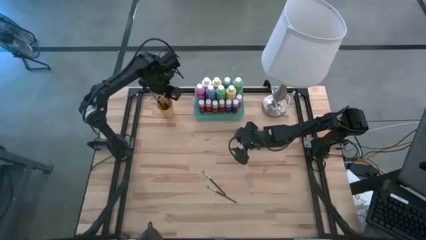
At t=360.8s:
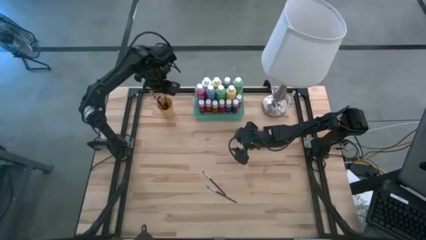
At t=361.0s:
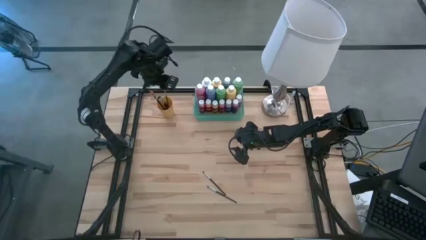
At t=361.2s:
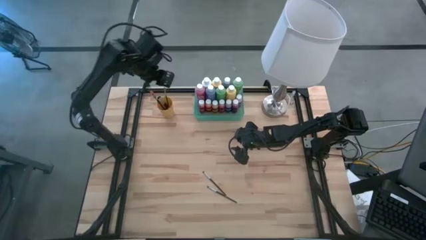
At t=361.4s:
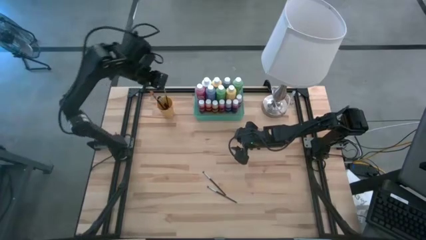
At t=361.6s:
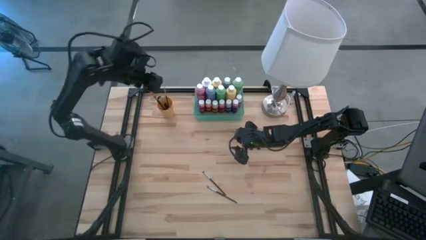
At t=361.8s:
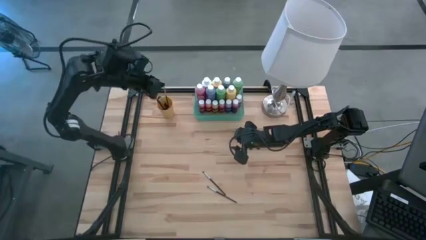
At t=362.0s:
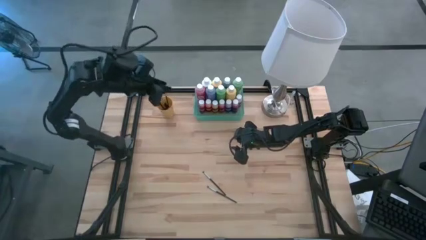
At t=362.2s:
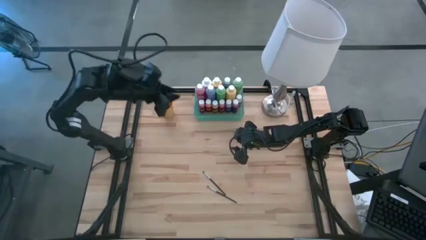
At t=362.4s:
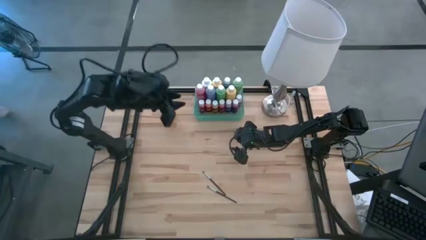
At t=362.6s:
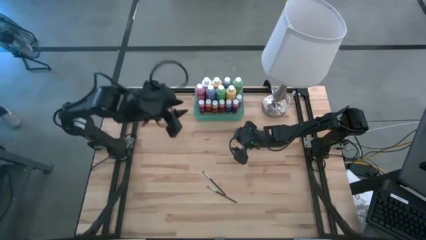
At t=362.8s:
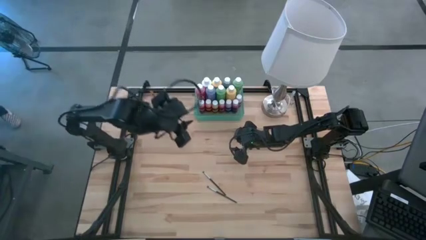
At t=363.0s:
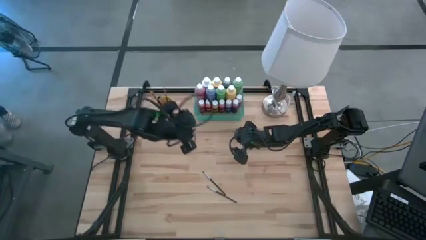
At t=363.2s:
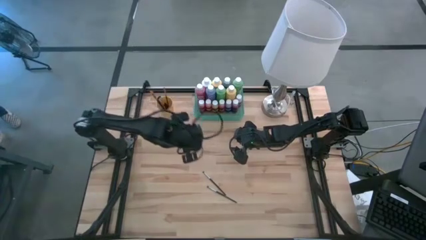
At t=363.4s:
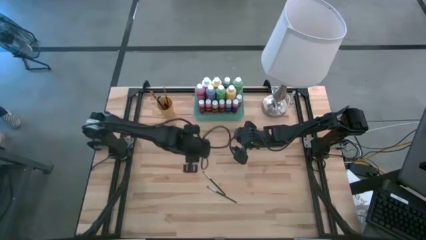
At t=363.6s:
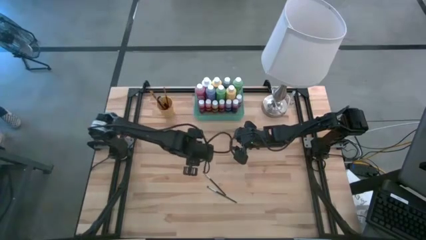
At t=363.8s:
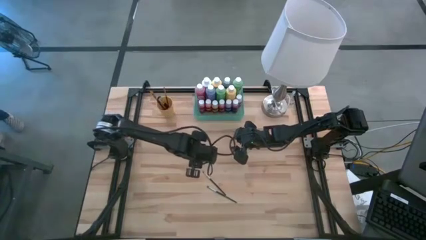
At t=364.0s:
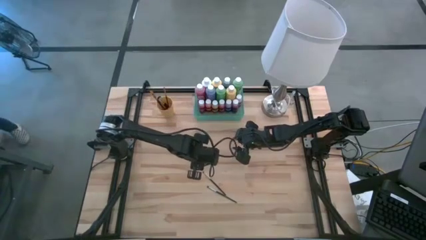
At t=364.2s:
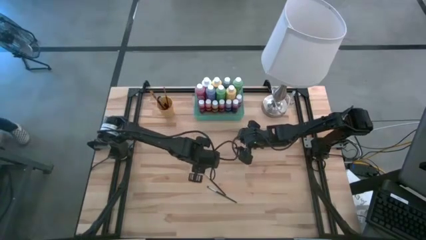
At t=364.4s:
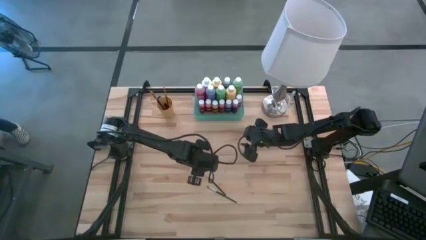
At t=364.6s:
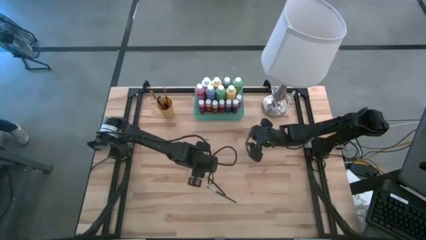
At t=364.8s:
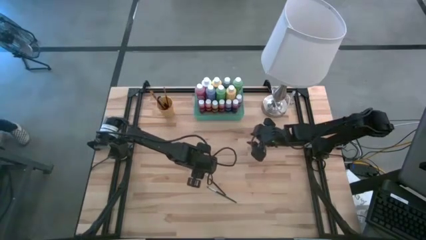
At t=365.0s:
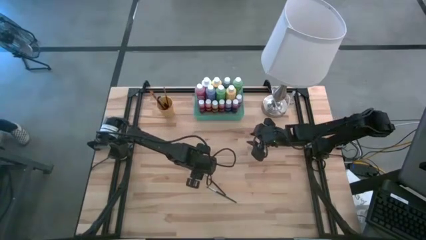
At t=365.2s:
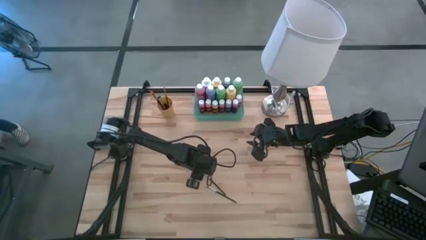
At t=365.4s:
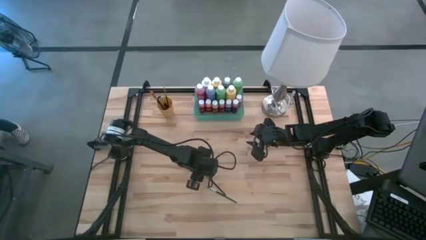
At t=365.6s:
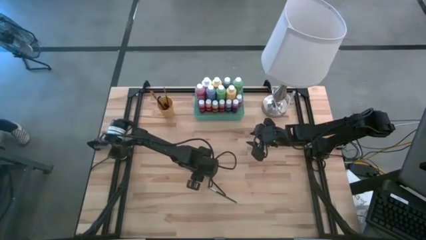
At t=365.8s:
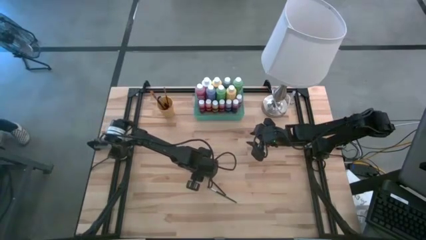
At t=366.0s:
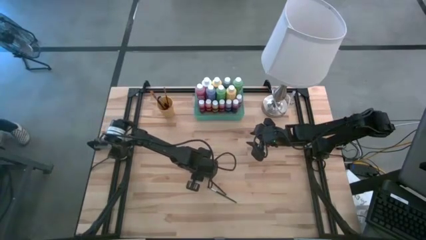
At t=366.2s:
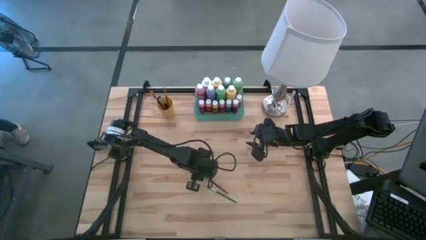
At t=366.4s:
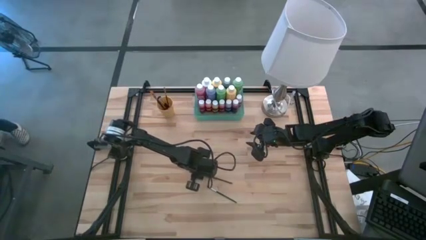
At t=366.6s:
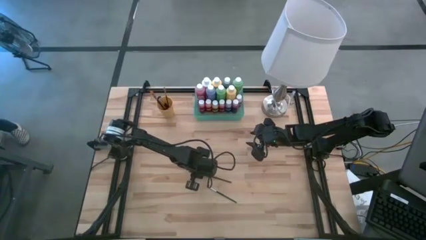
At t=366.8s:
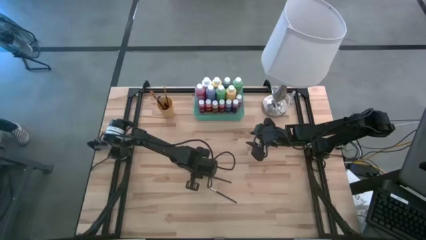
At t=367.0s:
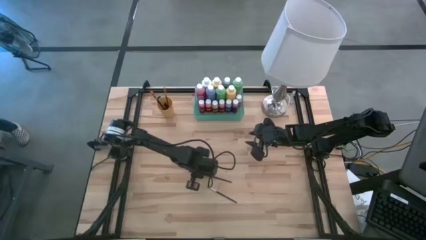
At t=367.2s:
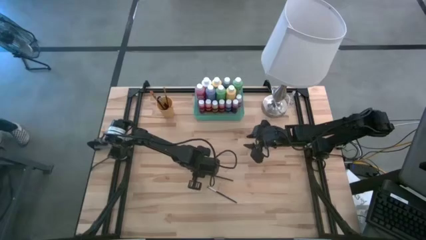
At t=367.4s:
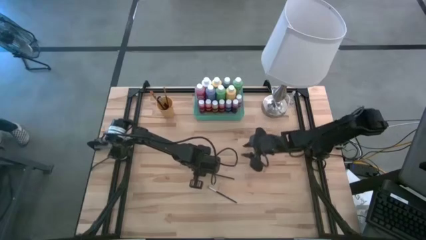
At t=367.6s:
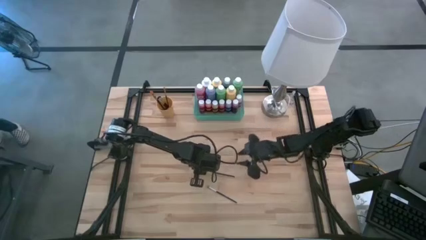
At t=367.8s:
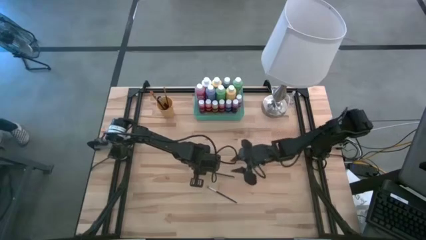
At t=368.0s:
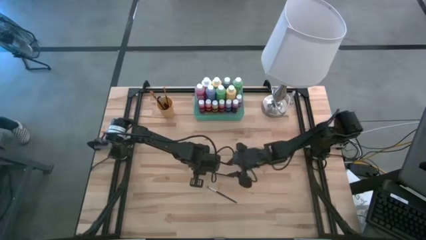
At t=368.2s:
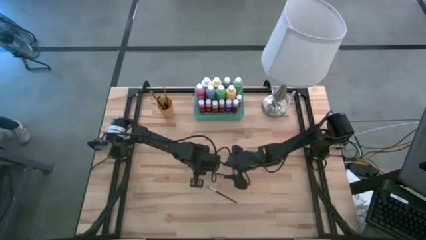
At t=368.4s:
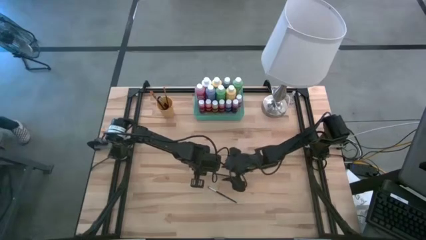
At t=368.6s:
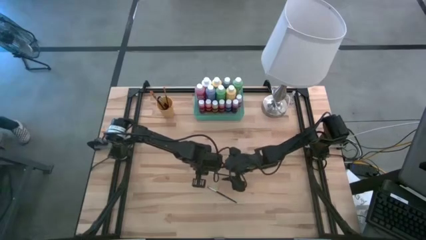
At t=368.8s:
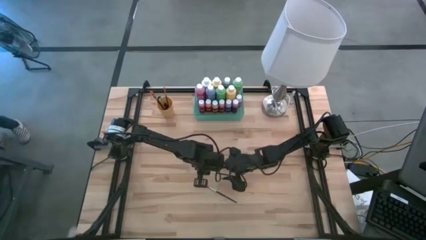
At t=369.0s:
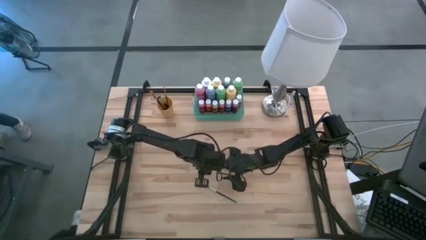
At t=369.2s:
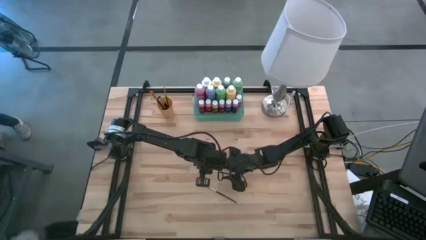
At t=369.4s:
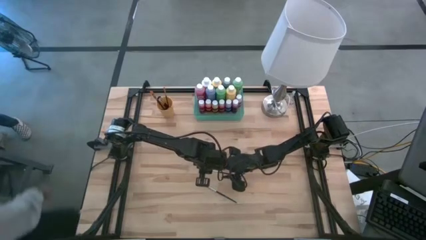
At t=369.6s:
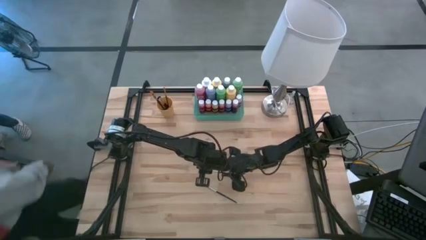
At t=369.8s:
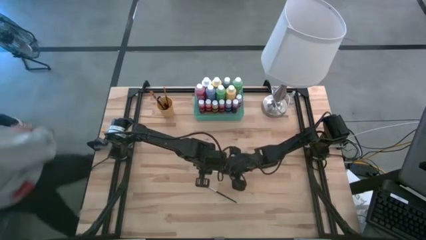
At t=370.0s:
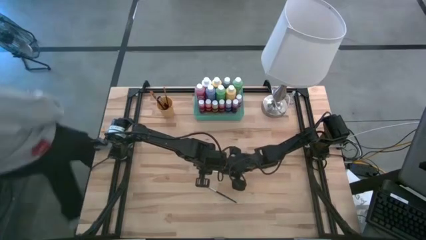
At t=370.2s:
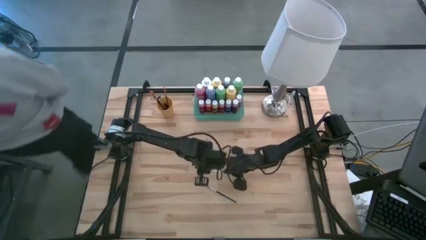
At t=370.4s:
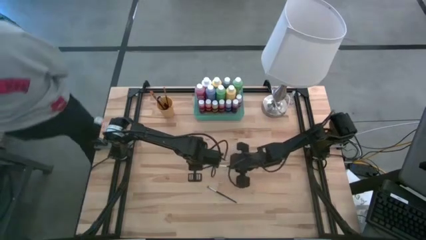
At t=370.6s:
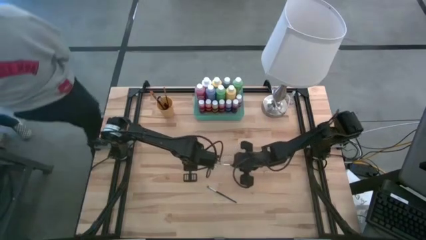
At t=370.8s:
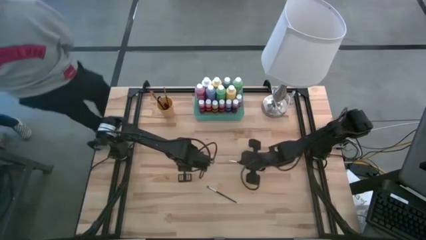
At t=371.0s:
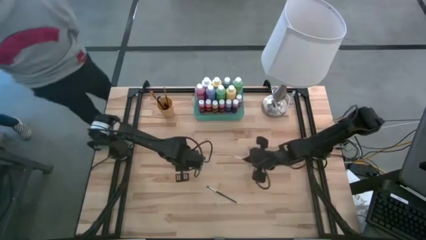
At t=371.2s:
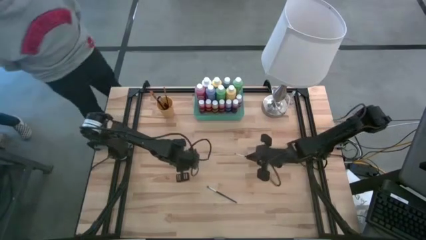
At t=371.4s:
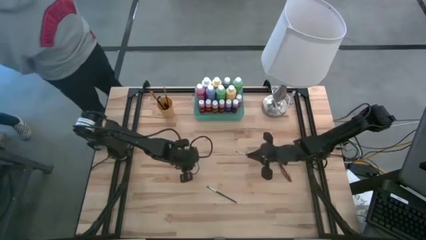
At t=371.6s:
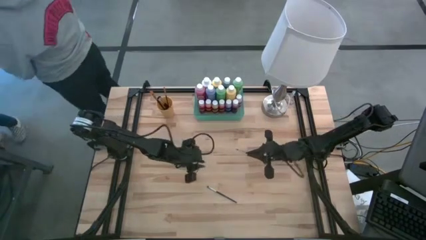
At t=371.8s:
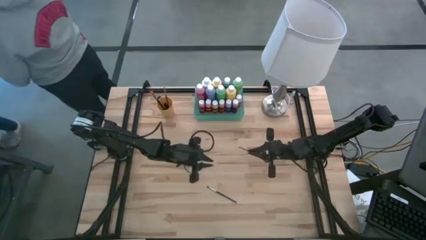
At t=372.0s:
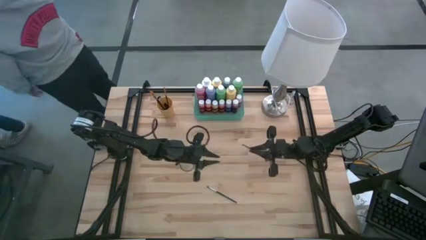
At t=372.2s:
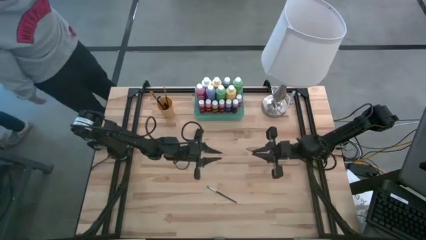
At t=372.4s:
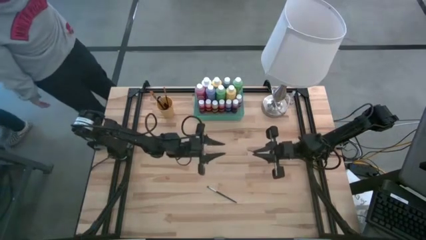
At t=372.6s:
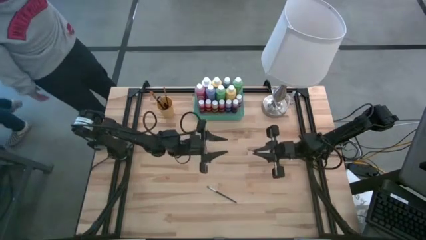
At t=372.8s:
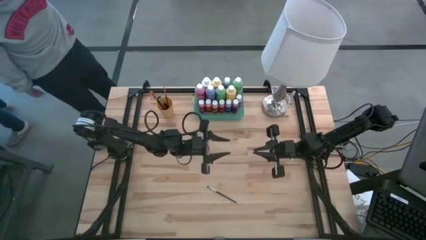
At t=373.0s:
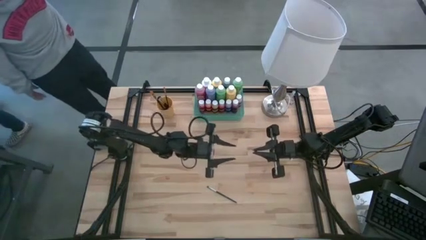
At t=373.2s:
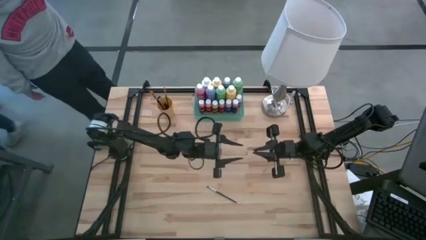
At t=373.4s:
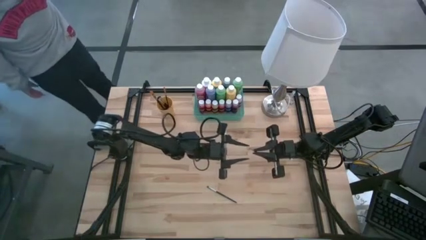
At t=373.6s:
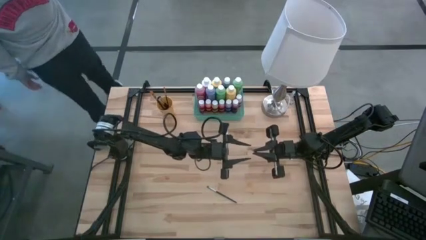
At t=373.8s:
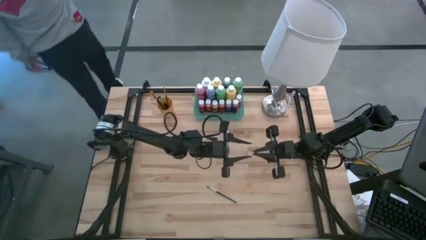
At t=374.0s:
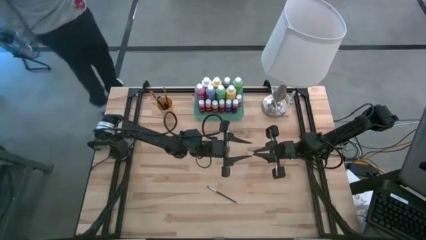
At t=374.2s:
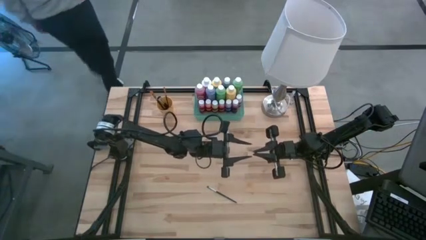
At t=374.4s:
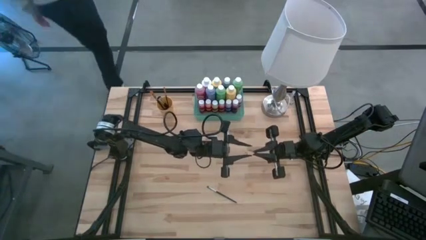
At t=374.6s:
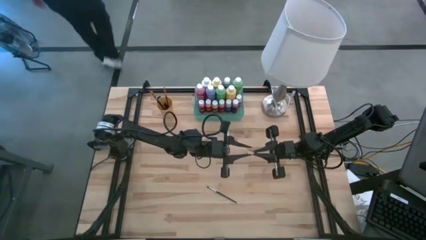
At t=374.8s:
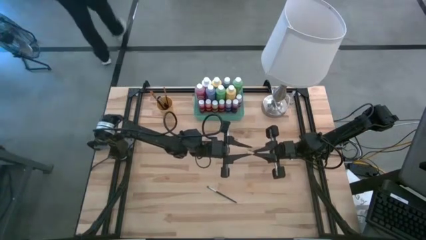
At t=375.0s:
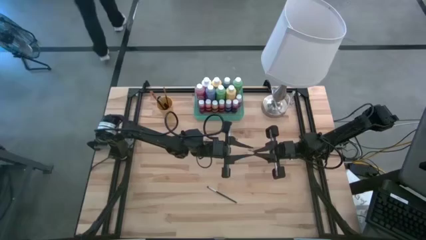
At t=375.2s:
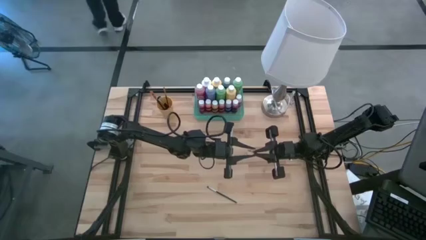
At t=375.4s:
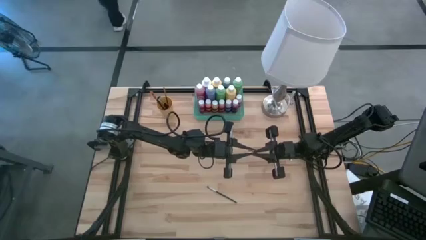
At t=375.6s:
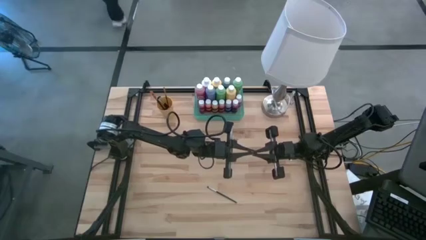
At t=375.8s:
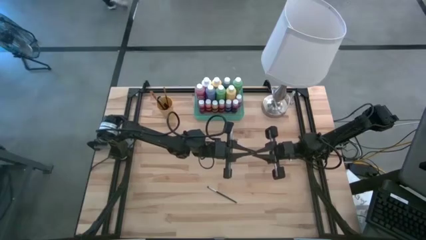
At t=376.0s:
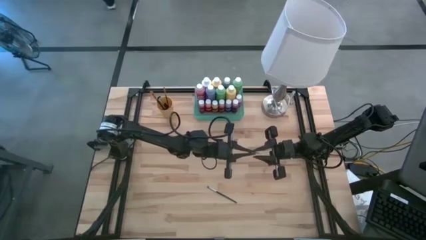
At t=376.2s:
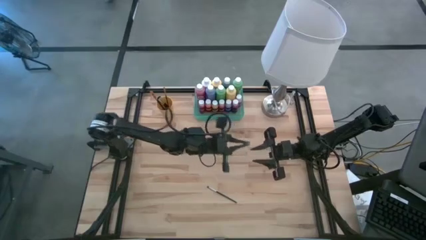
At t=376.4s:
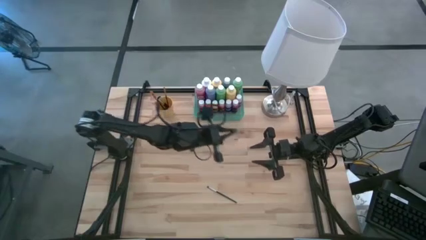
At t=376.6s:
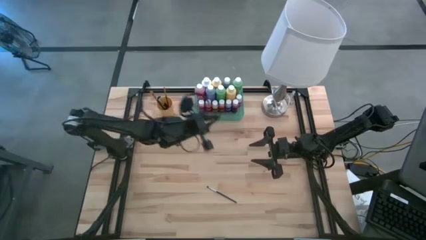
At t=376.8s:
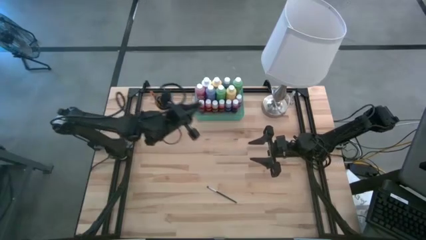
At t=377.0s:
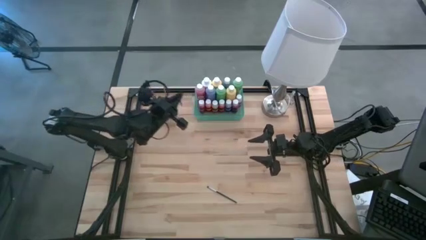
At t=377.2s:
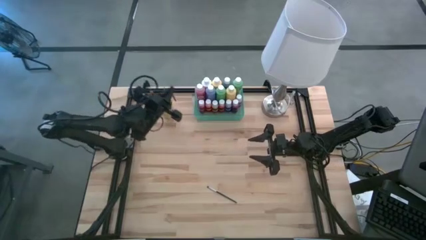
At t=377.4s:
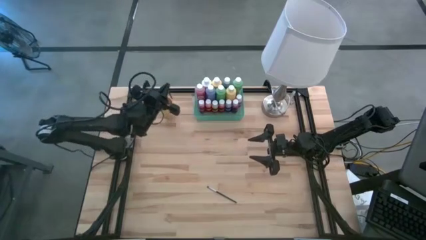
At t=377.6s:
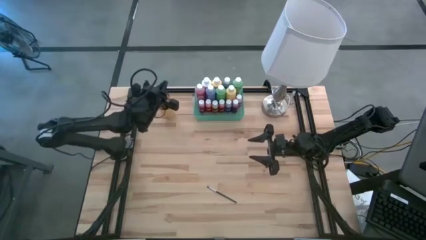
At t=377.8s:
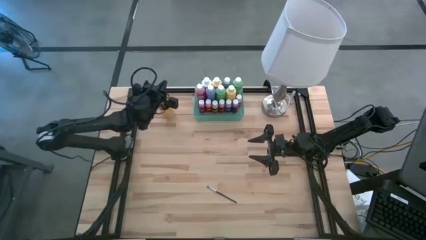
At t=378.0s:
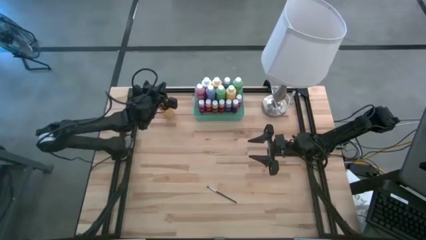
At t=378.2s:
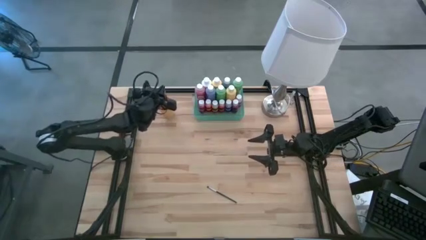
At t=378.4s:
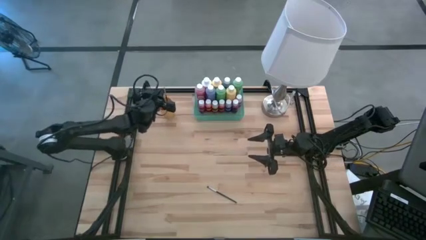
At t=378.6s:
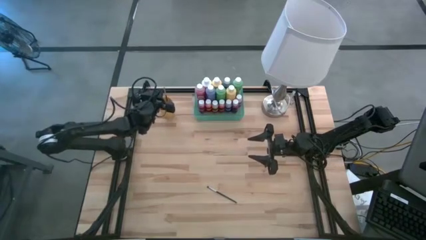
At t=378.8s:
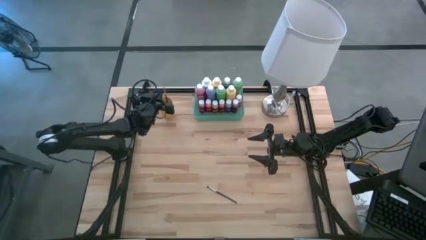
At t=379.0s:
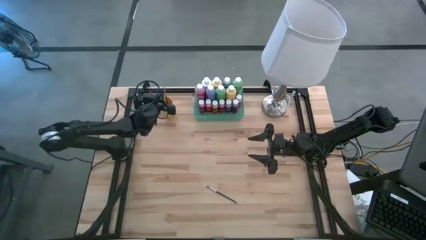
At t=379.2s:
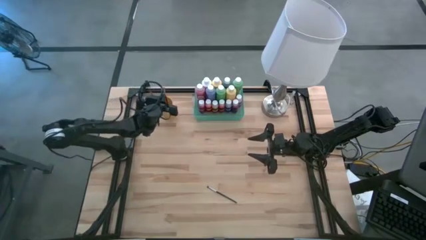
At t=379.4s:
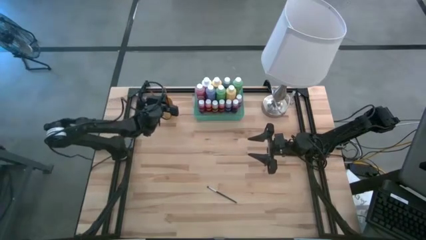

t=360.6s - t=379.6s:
Task: Pick & Place Paint Supplies
Put the silver paintbrush into the orange cup
